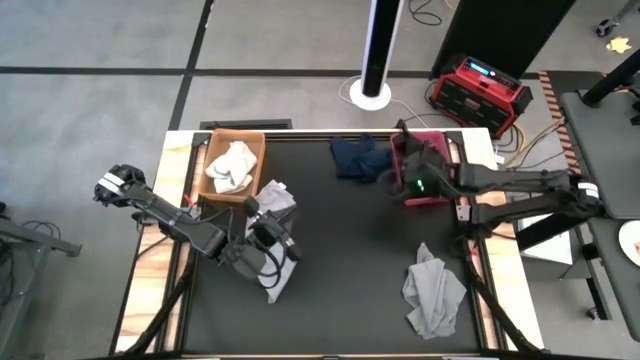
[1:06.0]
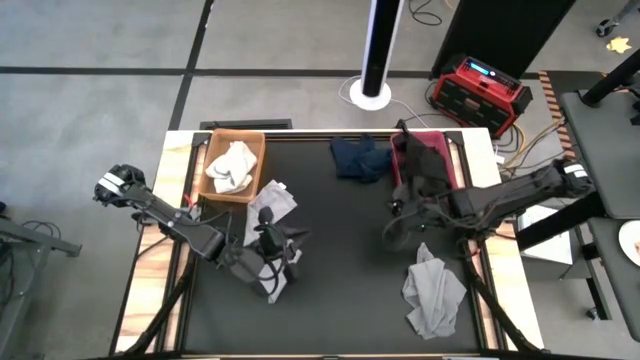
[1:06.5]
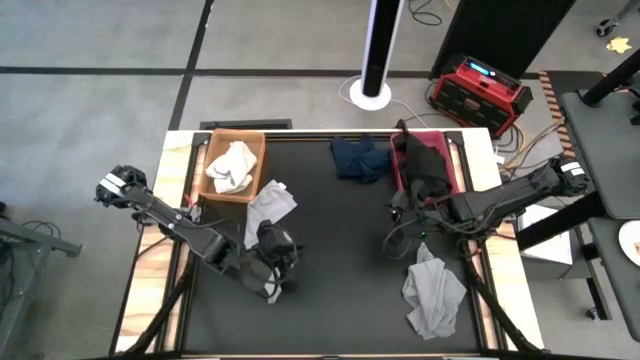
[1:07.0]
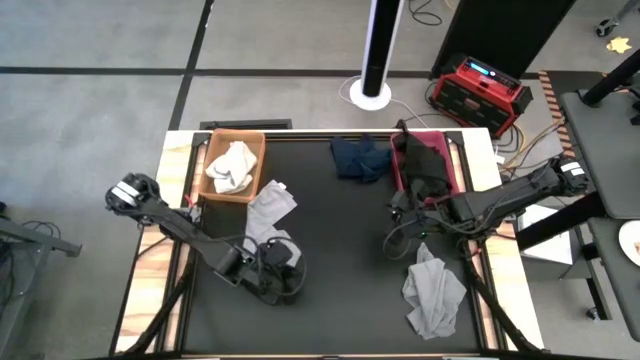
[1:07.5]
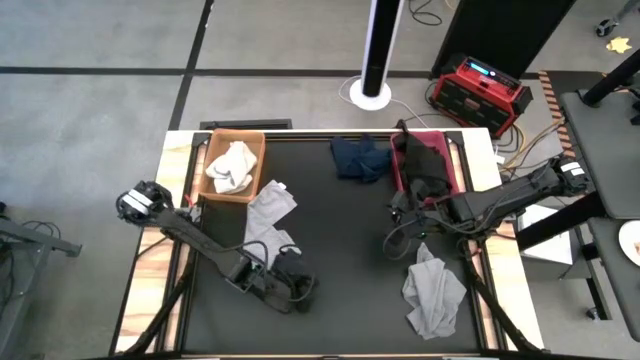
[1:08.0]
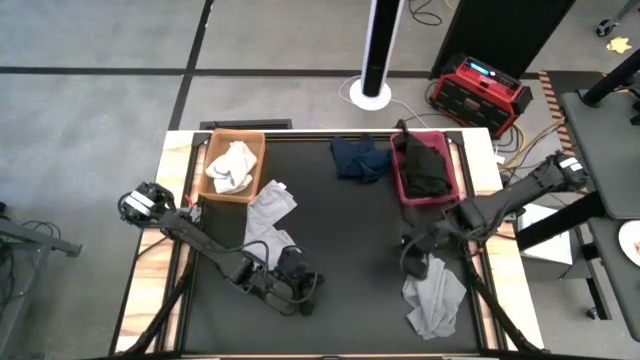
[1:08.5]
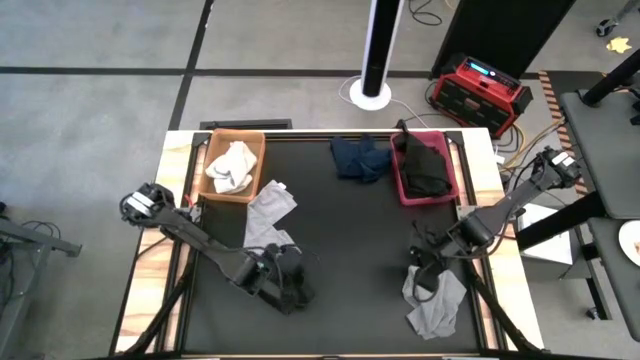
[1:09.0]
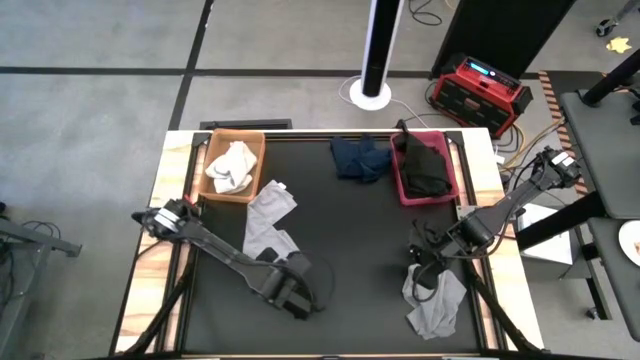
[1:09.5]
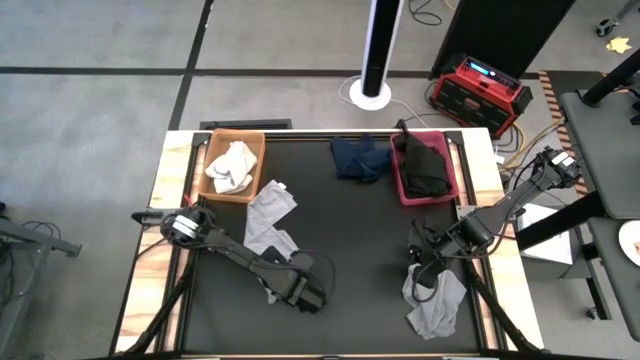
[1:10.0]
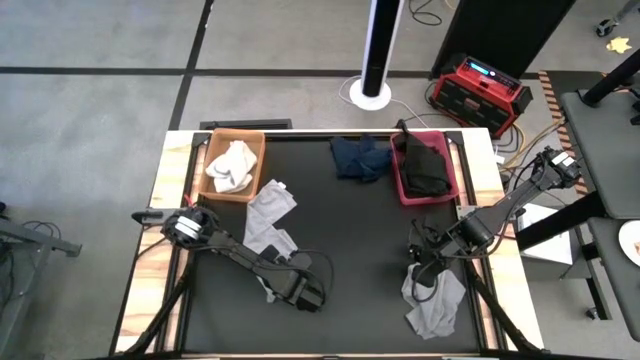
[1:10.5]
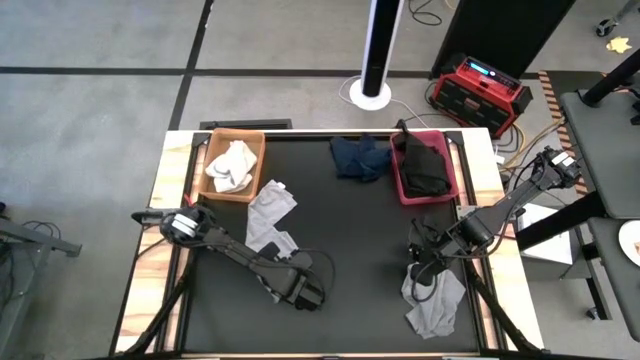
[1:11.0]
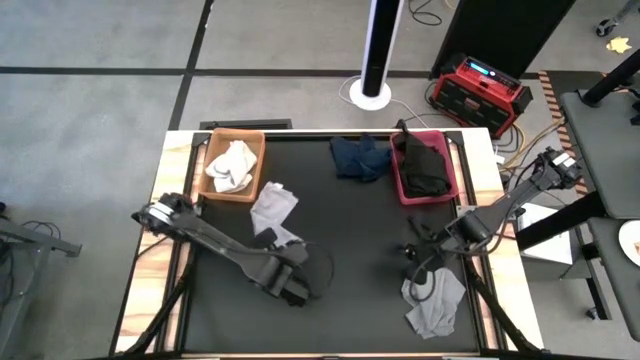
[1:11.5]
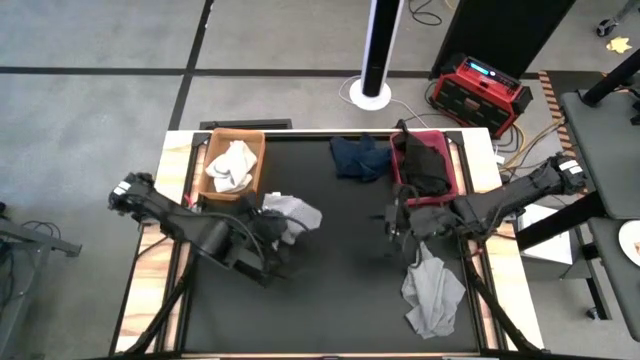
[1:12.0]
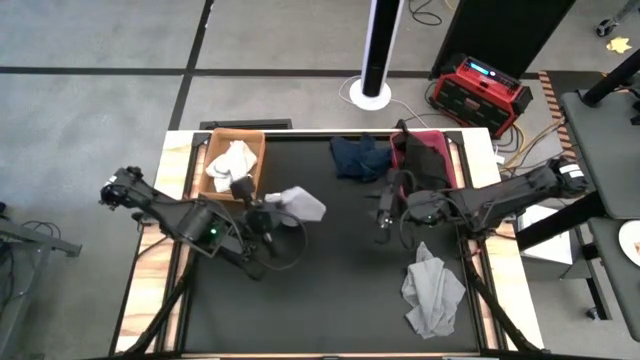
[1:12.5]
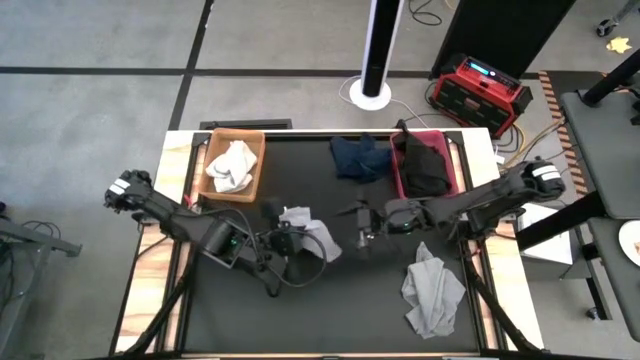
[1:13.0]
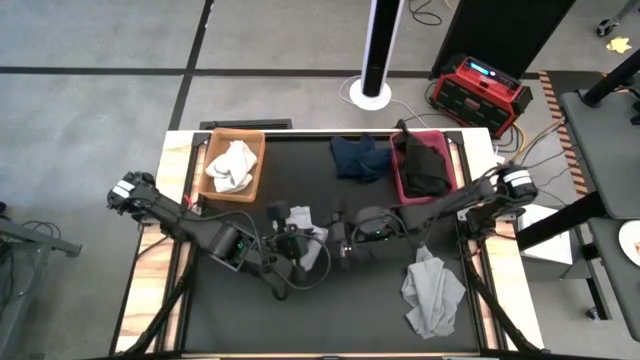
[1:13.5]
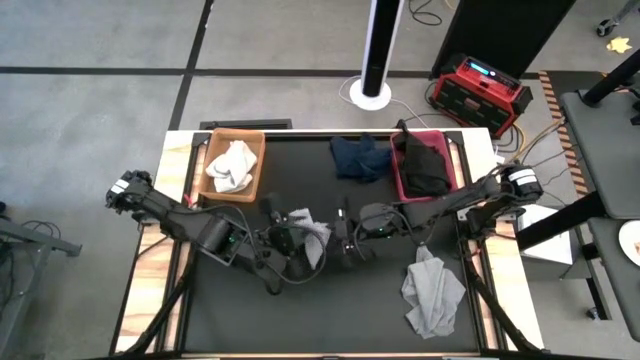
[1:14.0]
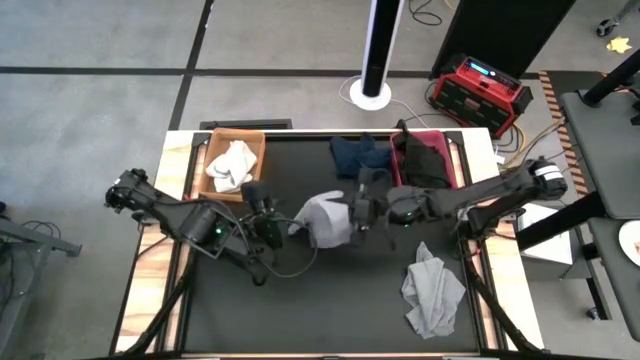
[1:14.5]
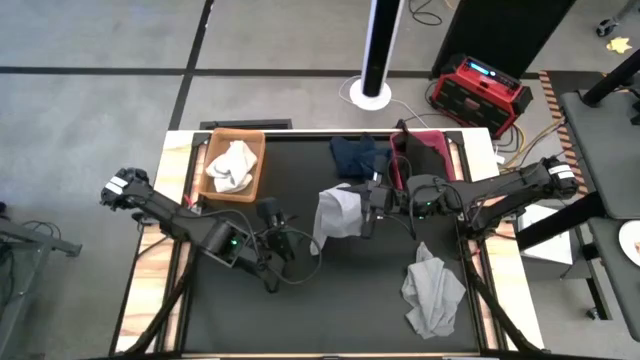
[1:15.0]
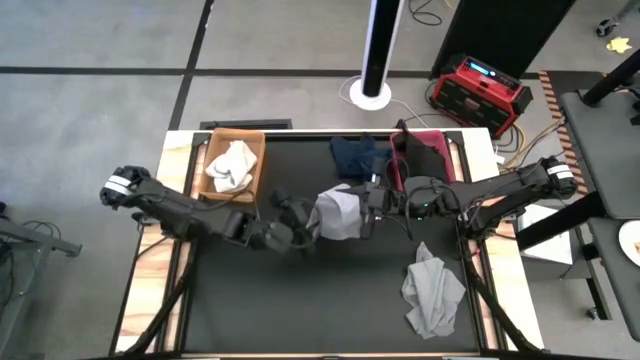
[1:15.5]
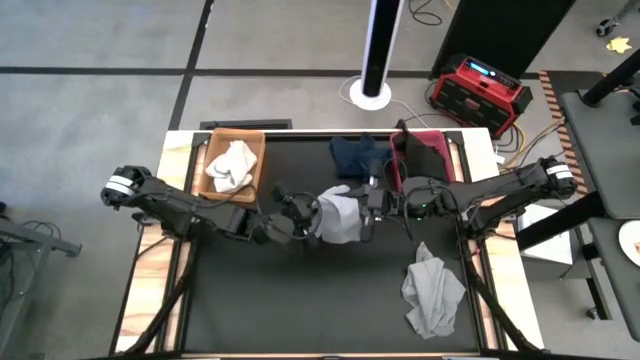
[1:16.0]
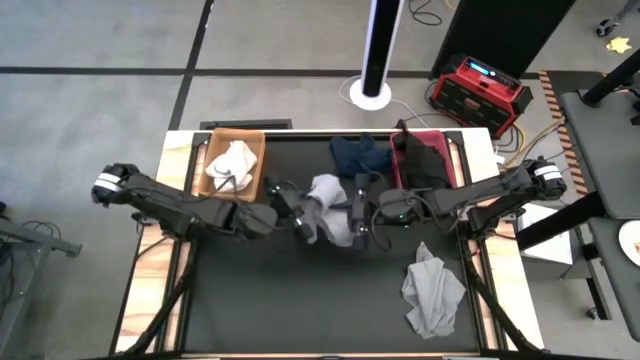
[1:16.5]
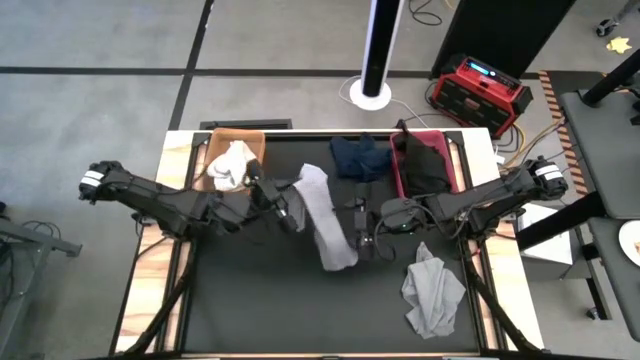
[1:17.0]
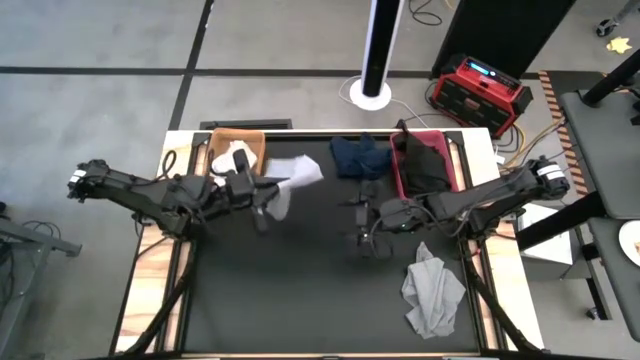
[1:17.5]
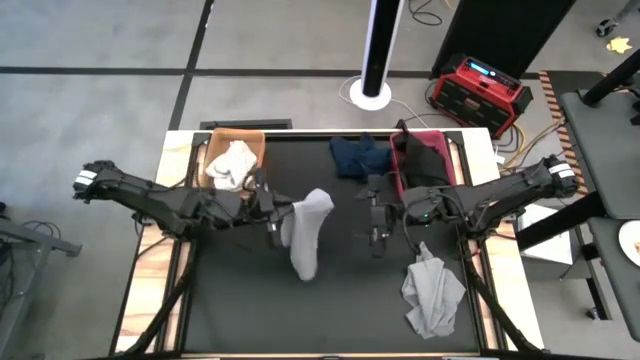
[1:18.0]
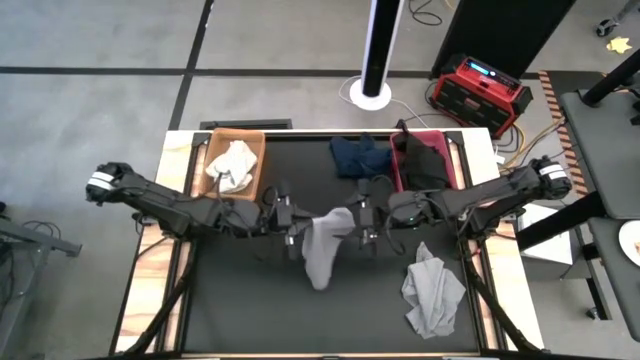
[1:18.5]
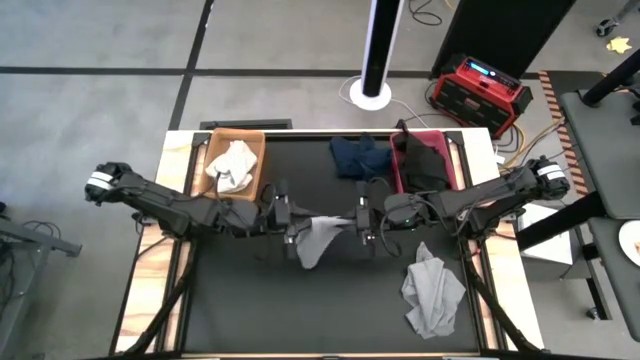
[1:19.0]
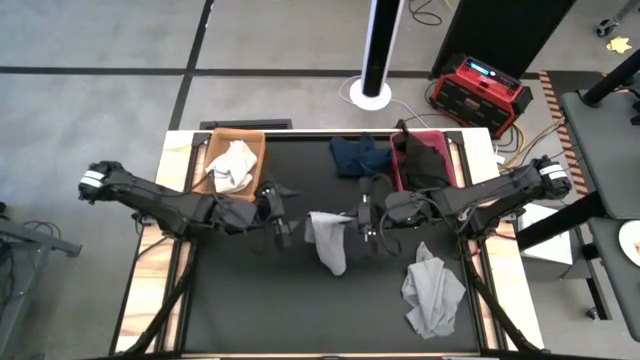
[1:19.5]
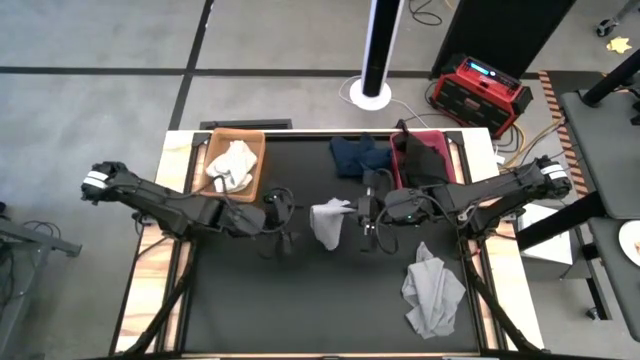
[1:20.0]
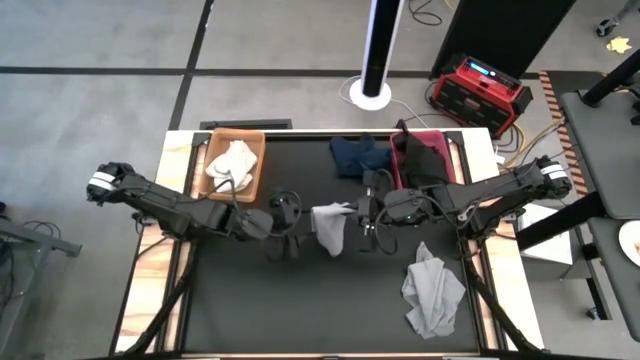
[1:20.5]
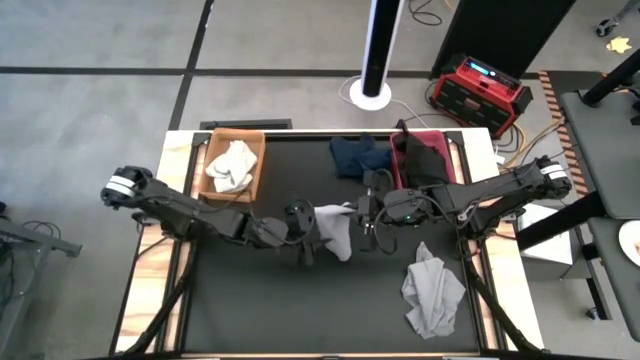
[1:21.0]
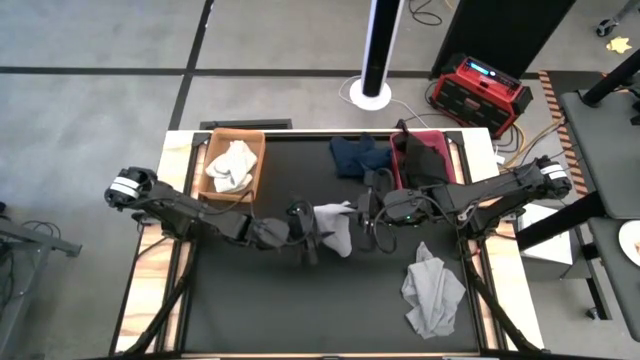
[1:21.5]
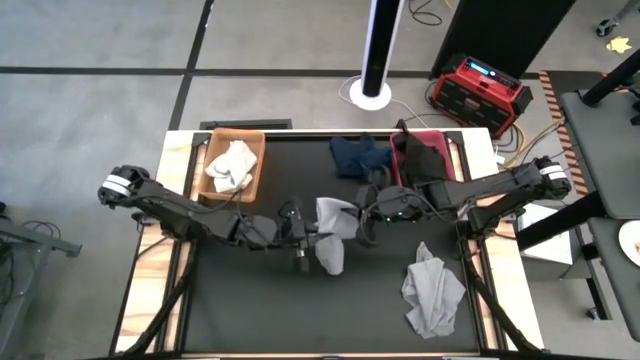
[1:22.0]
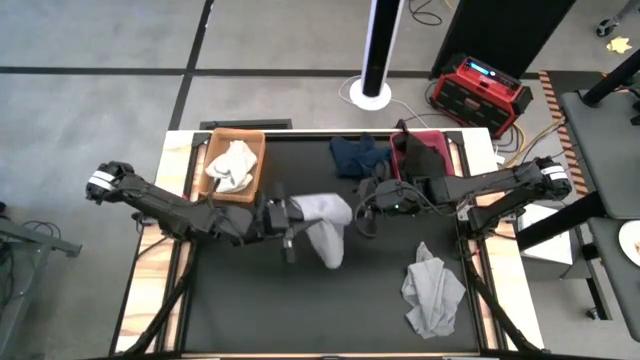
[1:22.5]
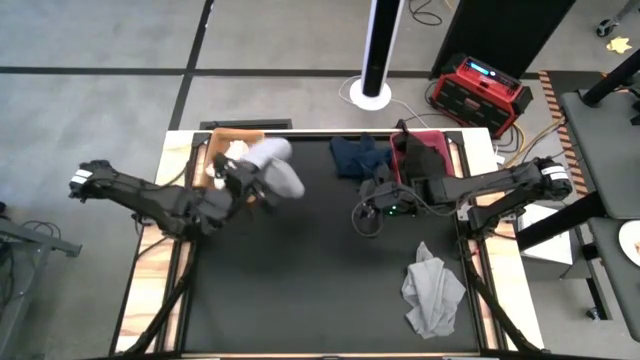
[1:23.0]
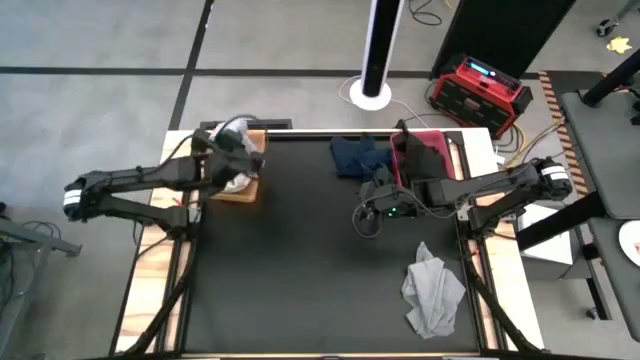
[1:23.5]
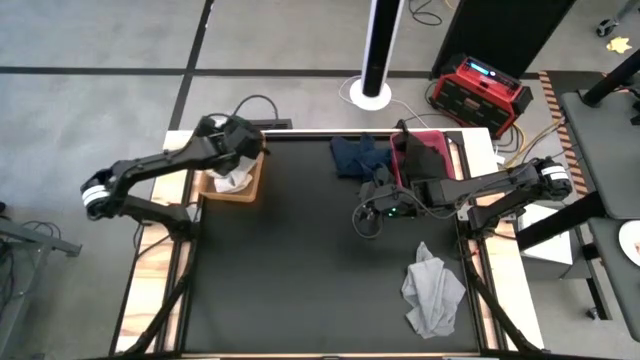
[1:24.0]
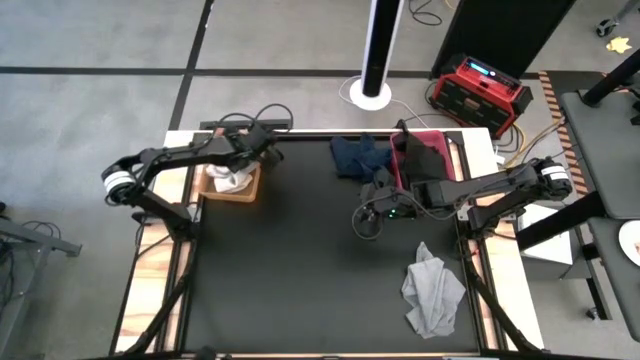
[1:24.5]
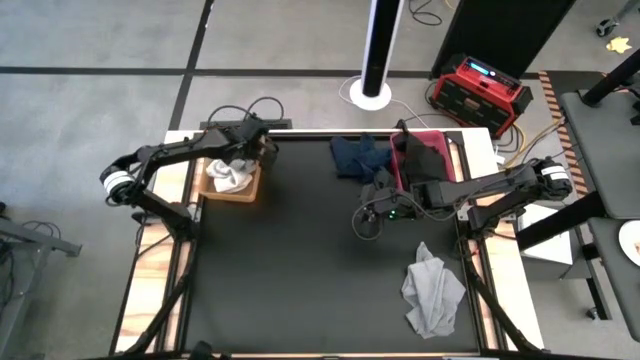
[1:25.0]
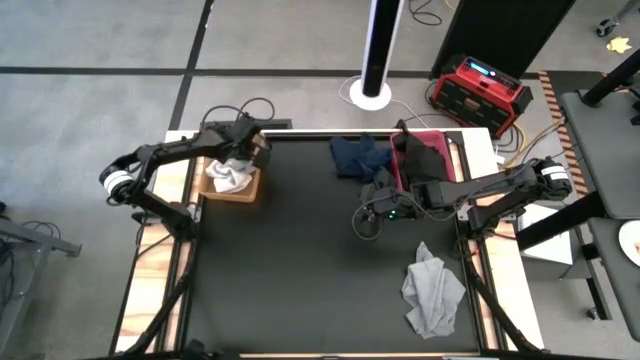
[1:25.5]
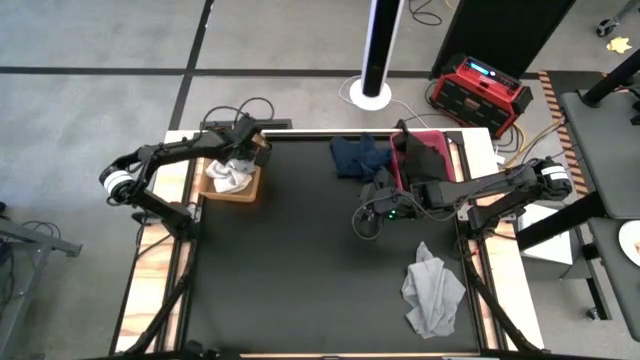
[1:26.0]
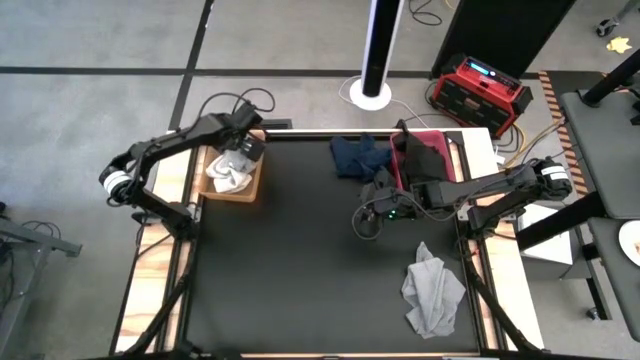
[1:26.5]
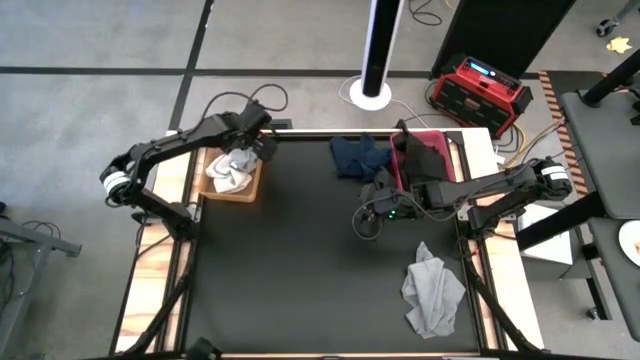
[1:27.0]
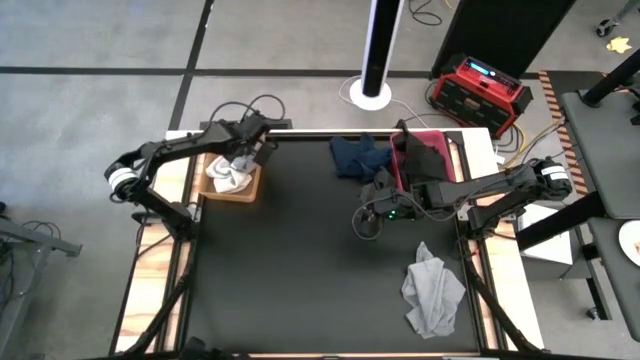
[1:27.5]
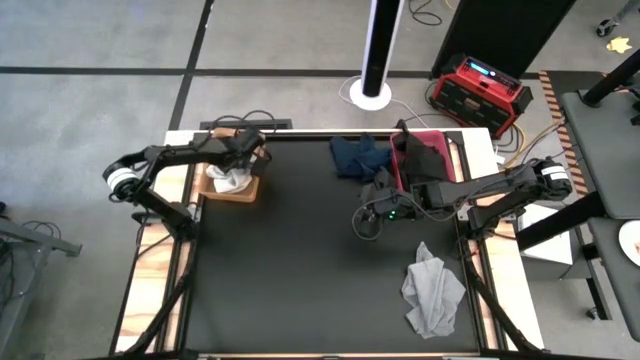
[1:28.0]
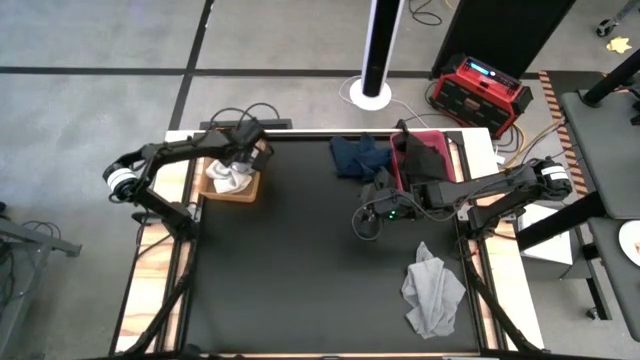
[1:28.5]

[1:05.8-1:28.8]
Task: Sort towels by color in basket
Put the left gray towel into the orange bin
